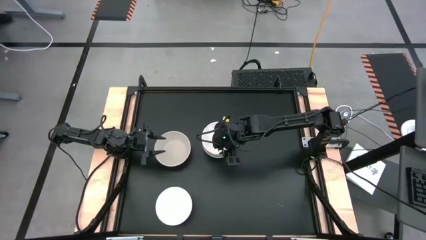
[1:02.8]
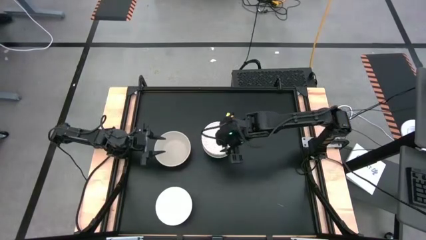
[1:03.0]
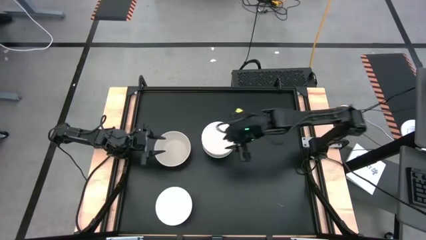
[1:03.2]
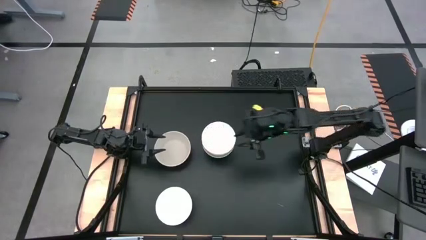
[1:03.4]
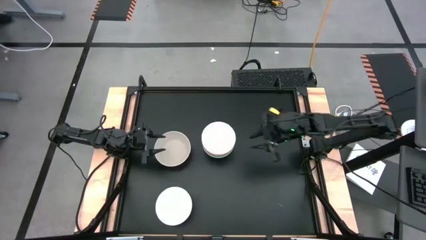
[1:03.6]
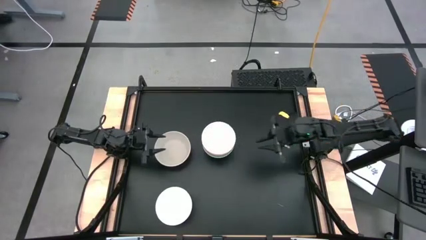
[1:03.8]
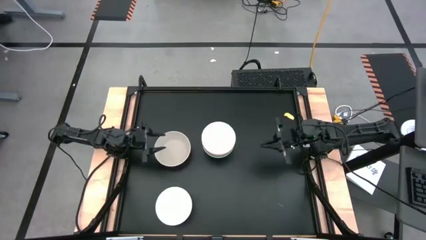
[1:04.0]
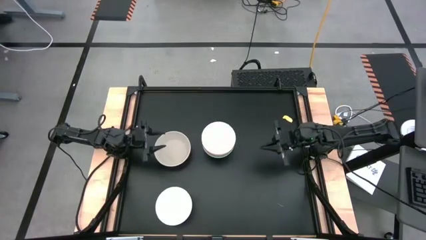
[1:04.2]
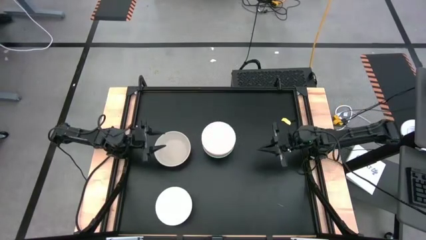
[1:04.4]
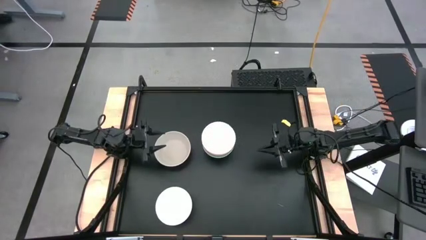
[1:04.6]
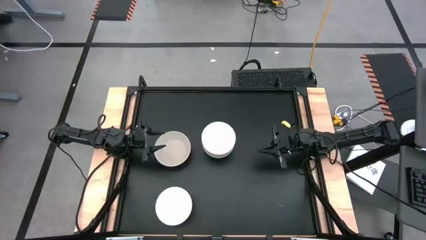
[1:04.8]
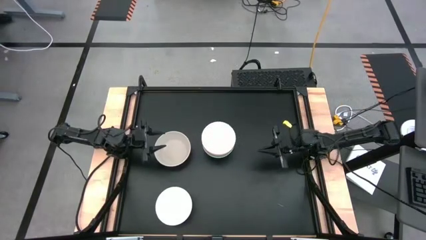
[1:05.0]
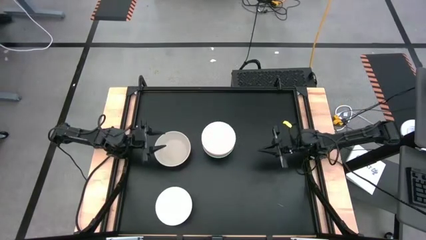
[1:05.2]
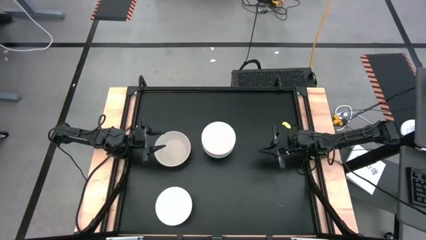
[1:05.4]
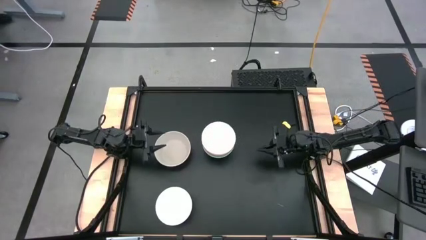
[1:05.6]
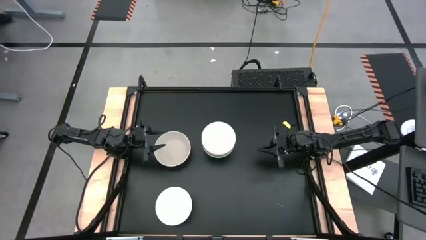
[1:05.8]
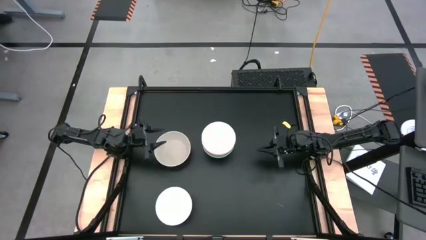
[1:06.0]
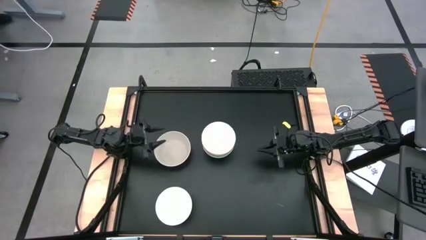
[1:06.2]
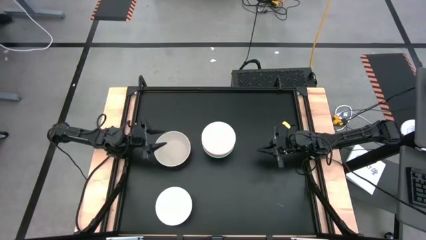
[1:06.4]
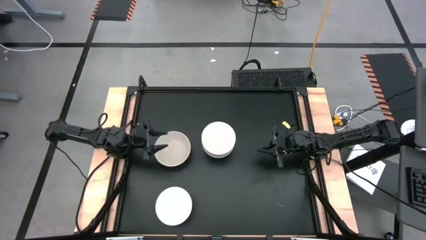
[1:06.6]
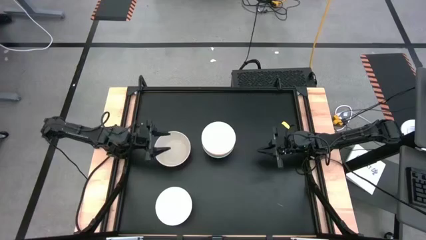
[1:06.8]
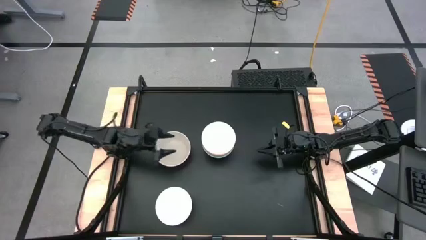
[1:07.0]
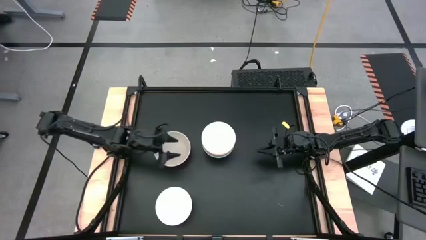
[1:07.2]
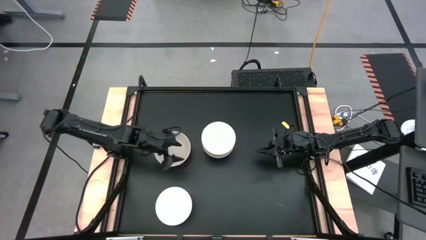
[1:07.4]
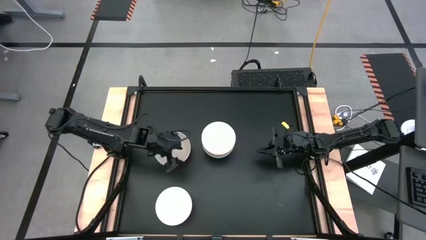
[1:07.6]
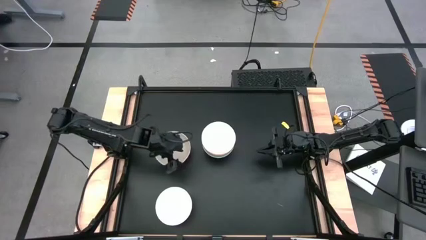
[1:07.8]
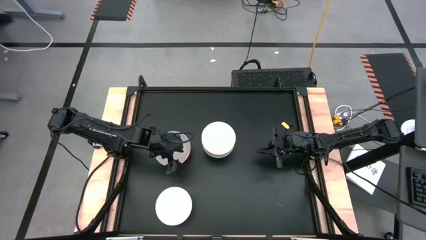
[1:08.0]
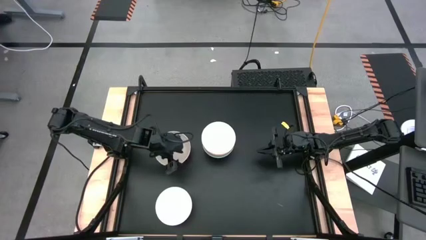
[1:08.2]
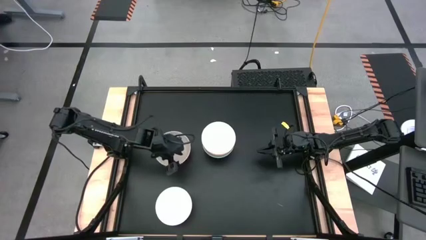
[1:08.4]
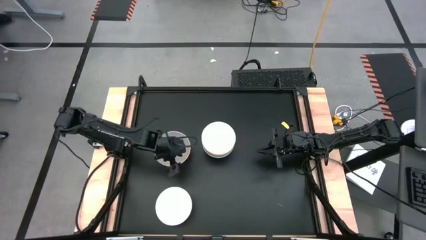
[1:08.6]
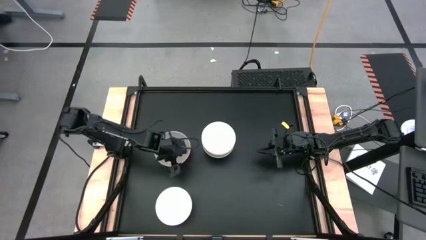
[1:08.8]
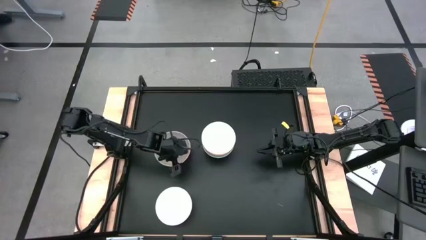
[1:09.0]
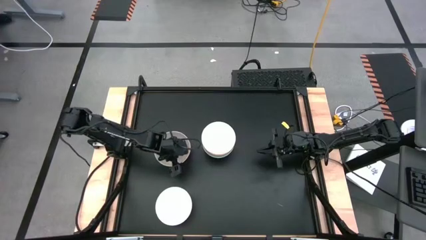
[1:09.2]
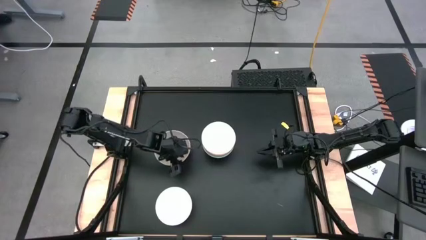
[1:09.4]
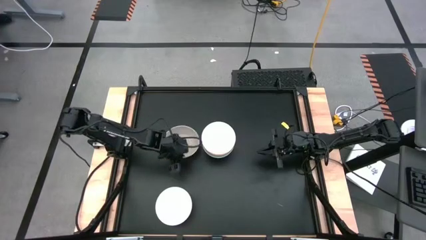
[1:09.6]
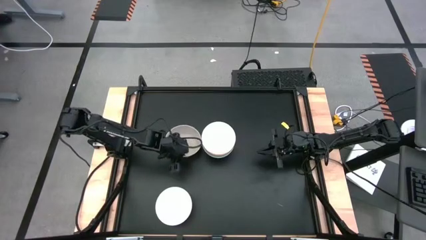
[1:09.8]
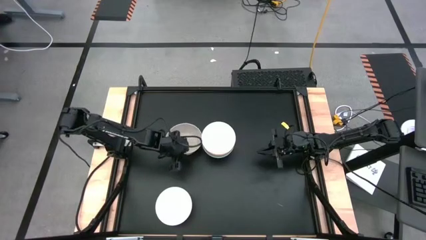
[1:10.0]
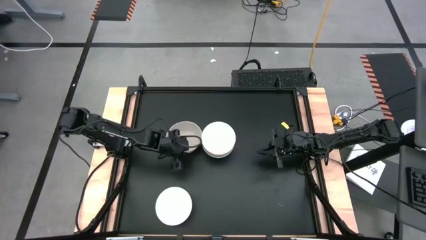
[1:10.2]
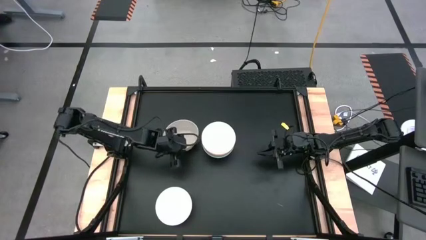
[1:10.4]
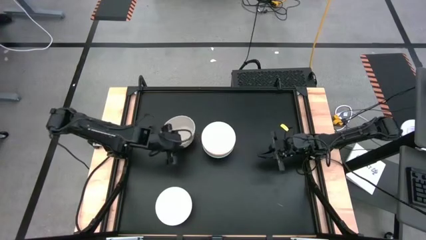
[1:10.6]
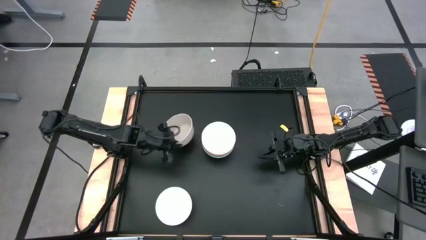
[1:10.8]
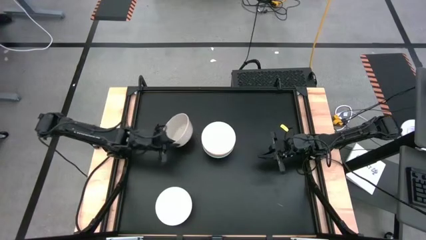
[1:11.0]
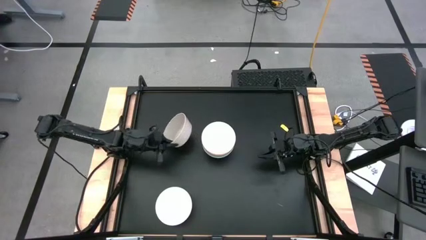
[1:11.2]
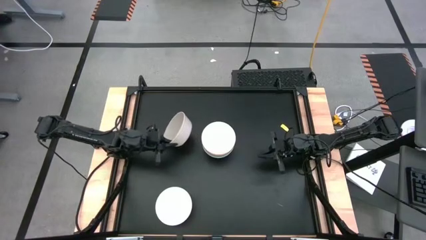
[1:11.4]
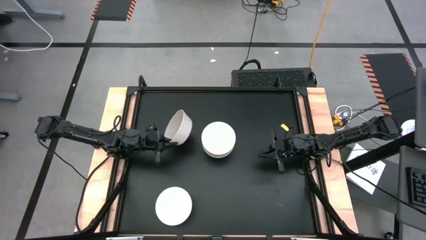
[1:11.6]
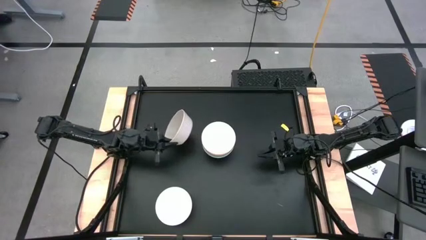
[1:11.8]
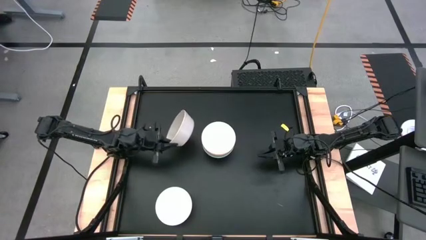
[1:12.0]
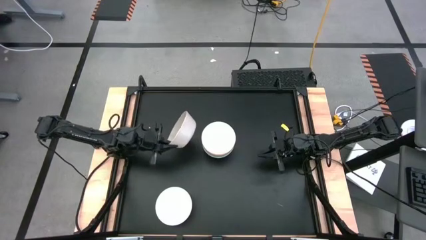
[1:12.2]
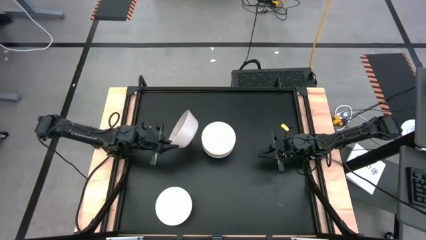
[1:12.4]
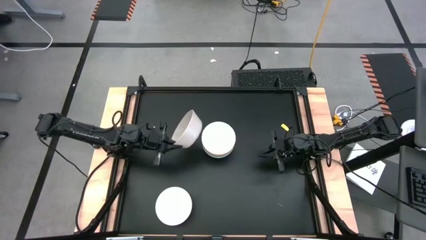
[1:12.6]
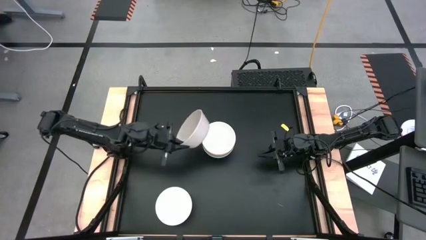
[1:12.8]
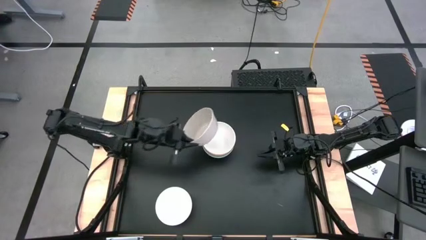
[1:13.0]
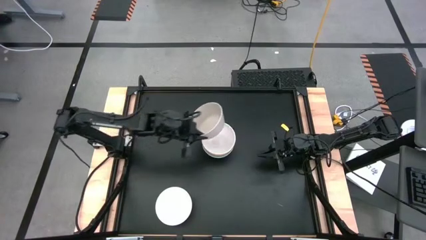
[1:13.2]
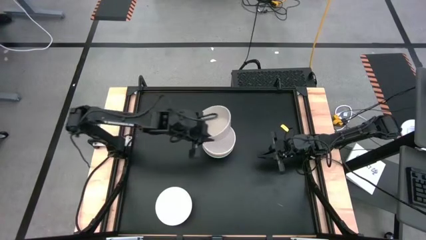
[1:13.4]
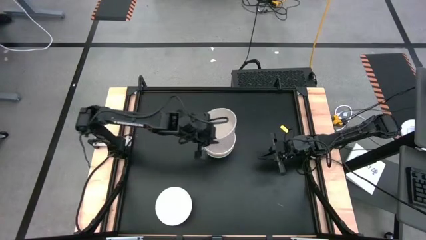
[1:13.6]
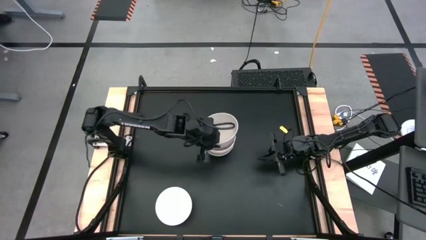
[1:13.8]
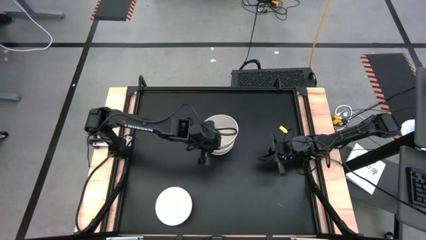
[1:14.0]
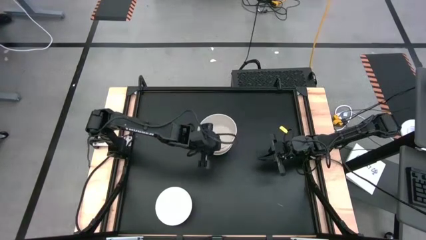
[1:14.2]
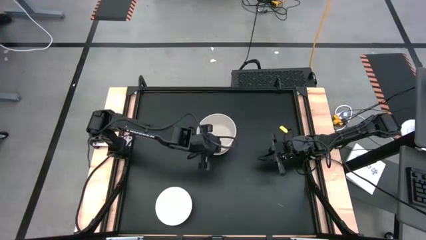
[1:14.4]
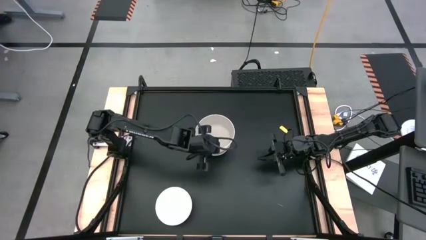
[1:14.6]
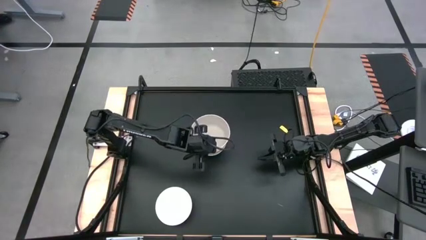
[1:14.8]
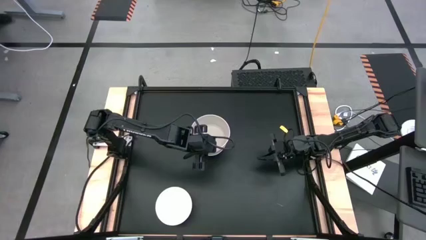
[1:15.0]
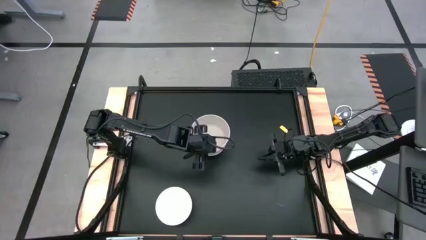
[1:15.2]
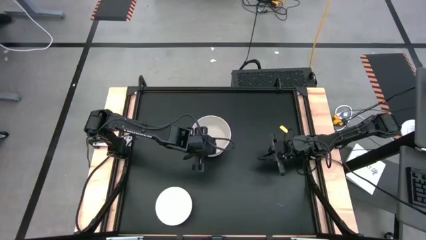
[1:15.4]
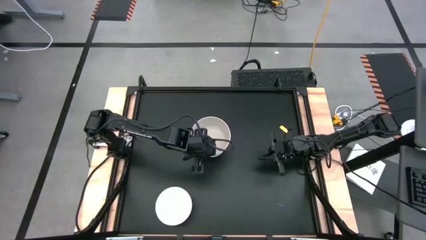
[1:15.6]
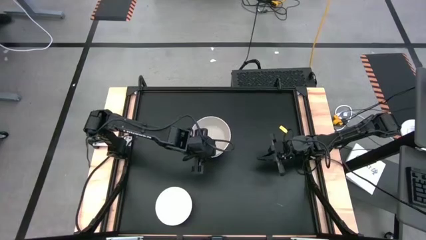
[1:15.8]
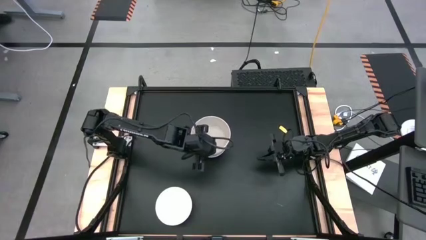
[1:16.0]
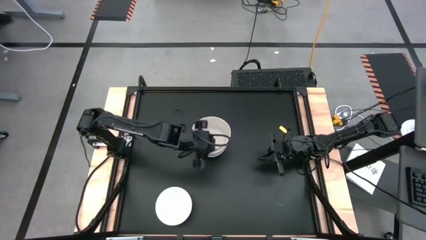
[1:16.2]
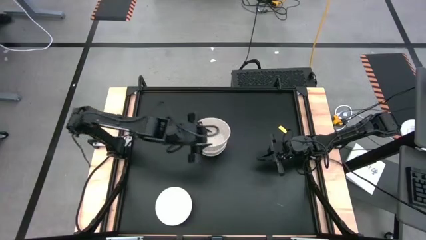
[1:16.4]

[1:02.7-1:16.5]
Task: Nest bowls inside each other
Stack the gray bowl on top of the top white bowl

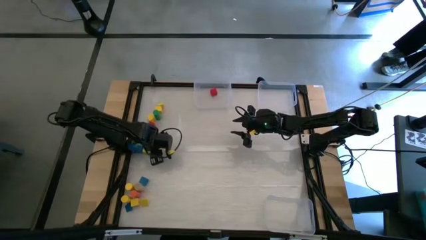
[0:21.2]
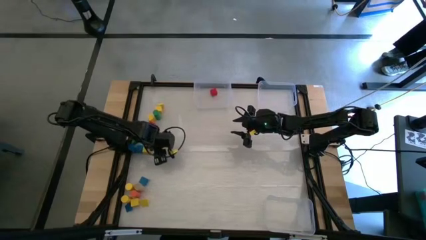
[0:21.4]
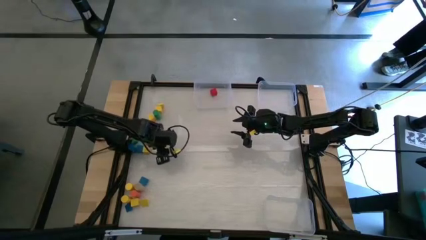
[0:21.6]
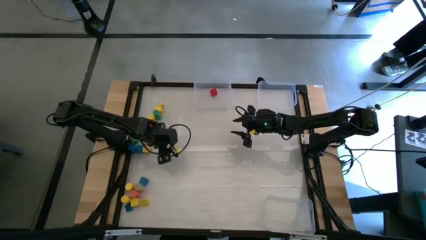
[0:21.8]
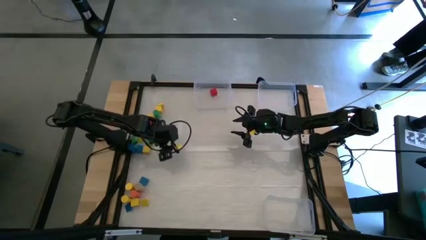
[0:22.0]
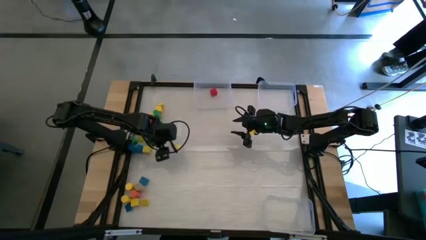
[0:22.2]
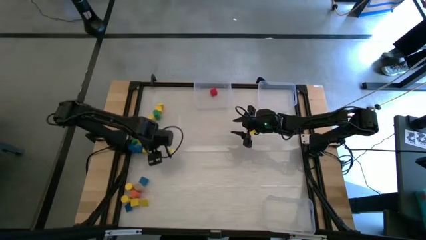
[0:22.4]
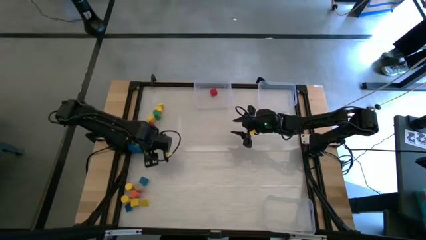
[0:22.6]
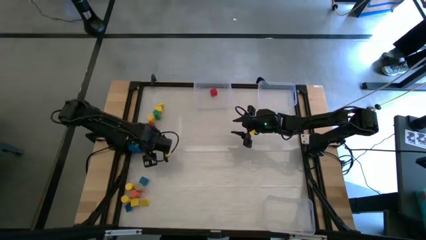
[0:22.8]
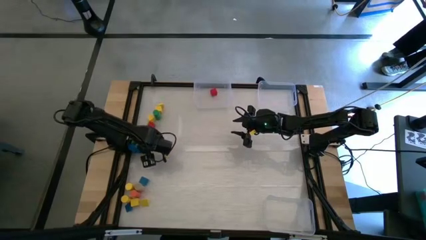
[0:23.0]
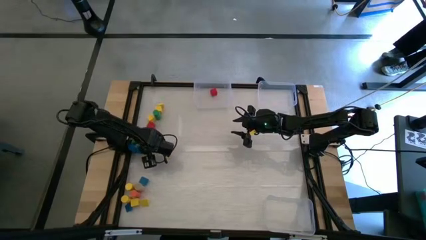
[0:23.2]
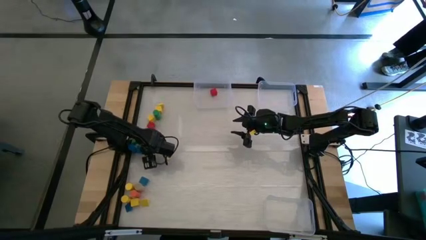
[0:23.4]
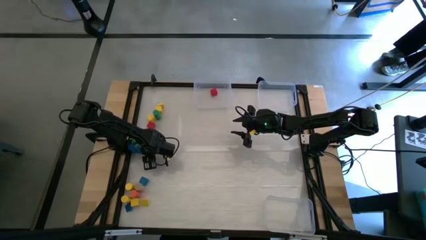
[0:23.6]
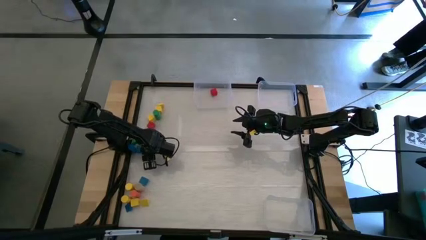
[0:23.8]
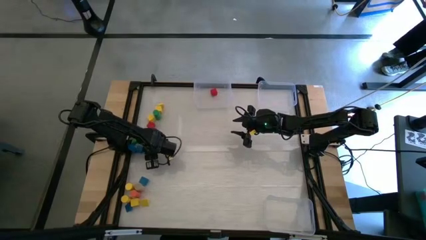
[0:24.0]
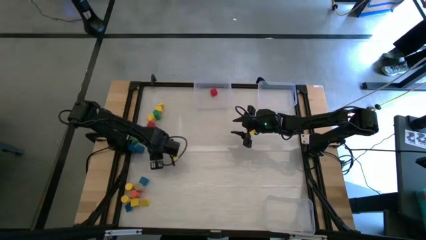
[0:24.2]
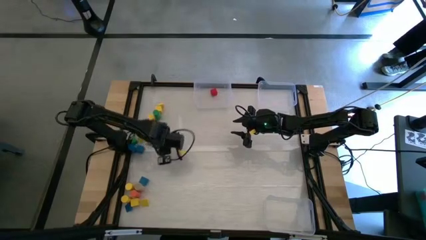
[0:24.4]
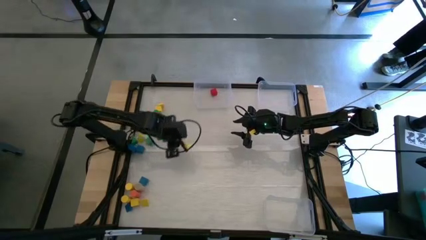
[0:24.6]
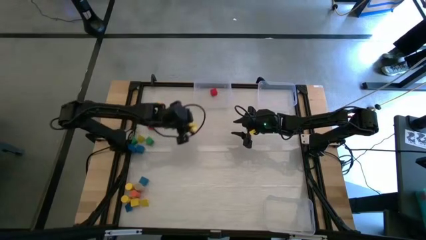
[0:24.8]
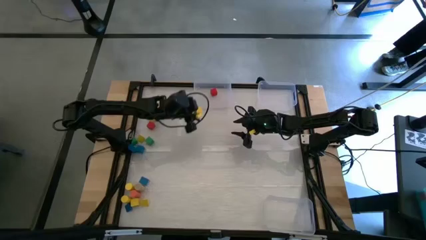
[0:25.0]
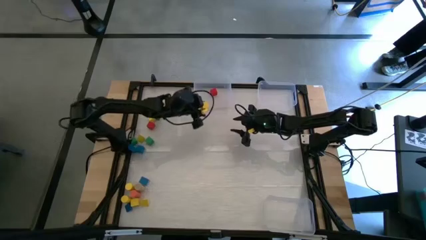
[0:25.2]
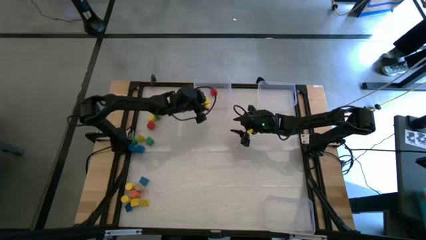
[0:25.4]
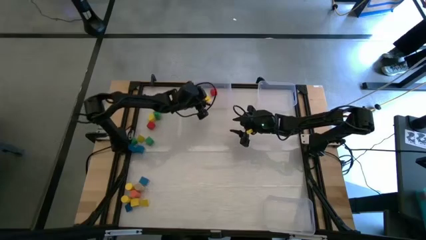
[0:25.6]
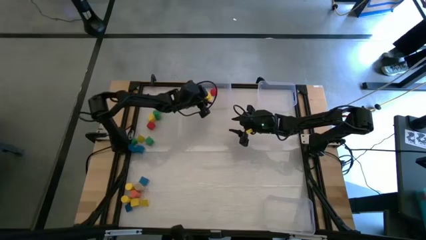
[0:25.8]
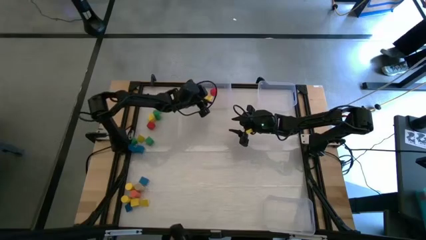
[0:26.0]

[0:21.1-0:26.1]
Task: Sort blocks by size
Put the square yellow block into the top left transparent bin
